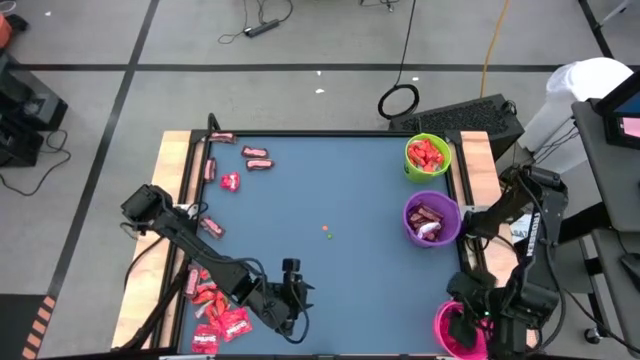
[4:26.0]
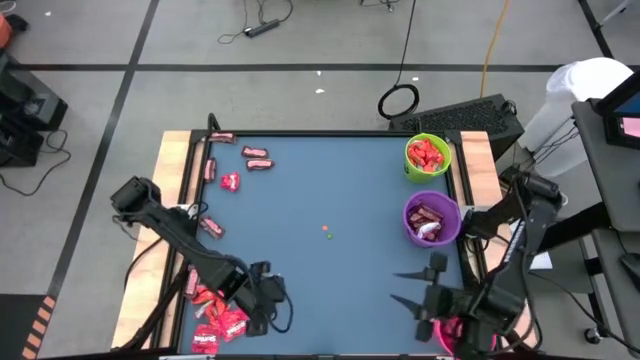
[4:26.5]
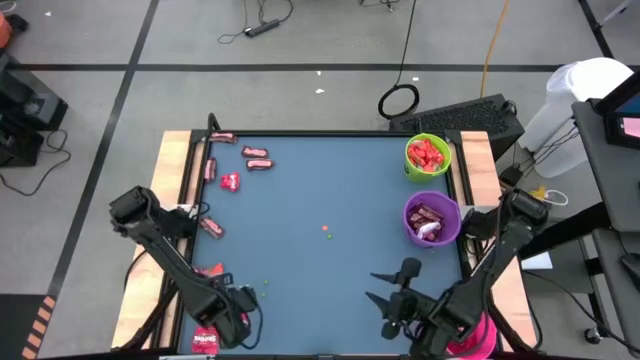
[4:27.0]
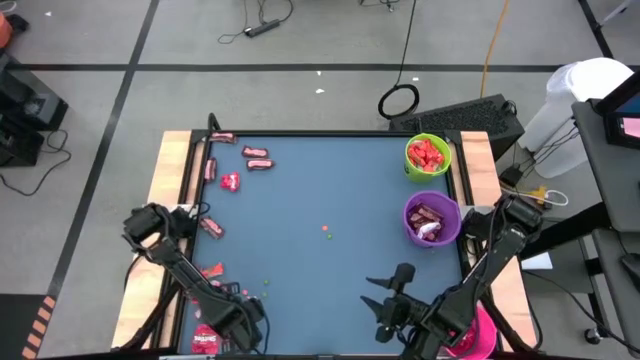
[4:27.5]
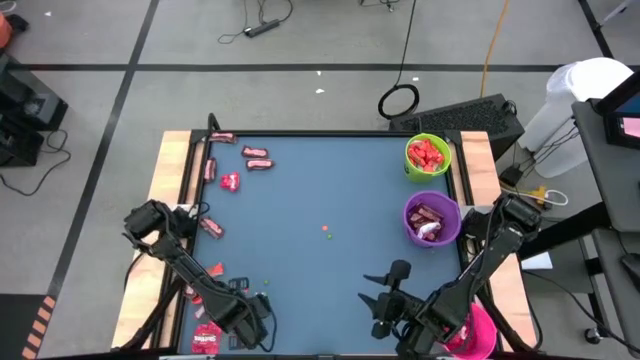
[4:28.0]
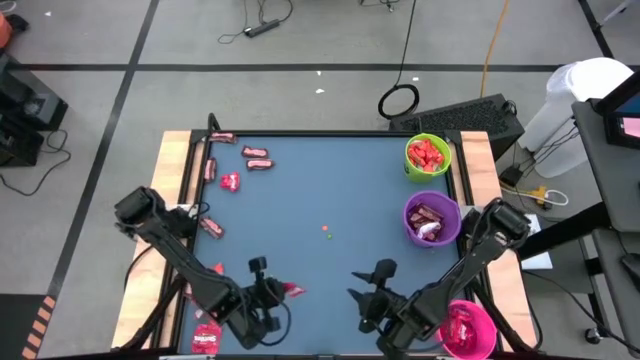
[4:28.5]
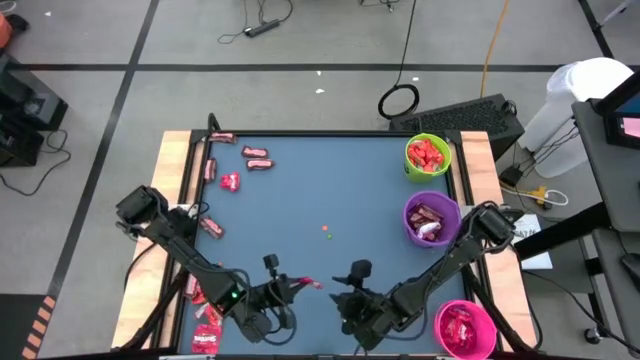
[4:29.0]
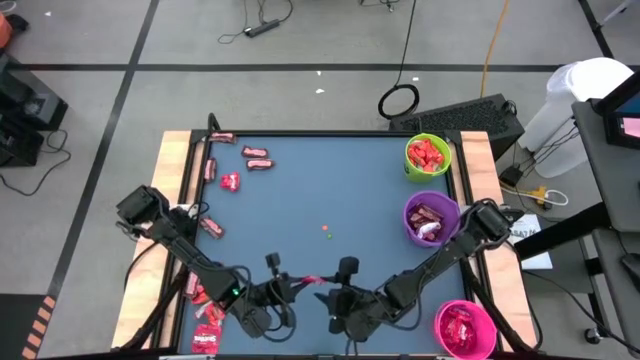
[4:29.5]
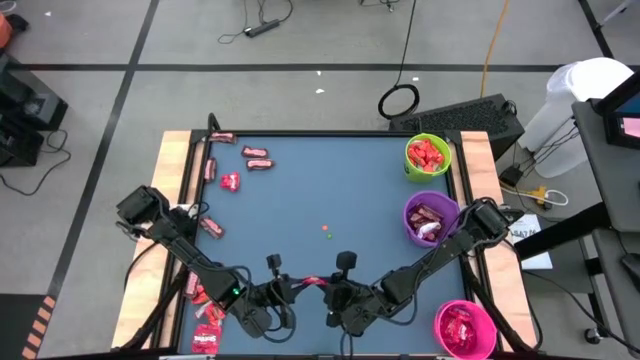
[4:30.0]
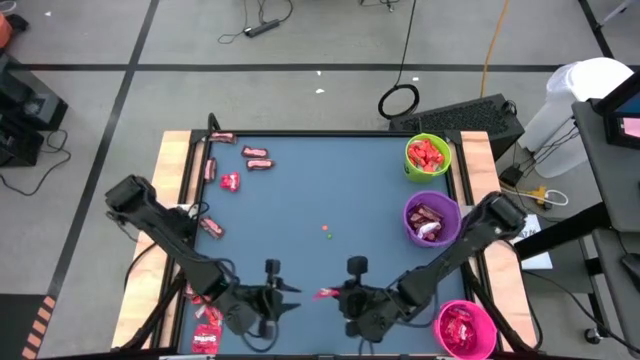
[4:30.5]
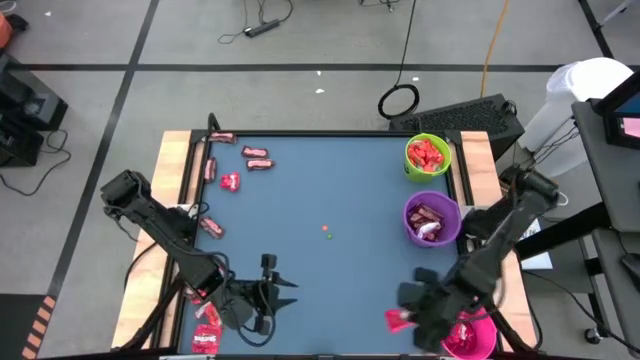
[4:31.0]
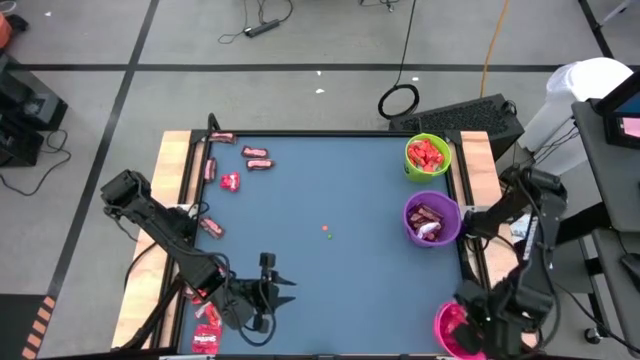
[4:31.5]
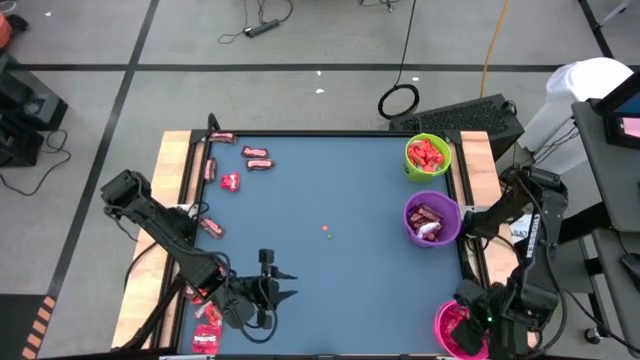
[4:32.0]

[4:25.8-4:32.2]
Task: Organize candy in baskets
Put the red candy pack into the pink bucket

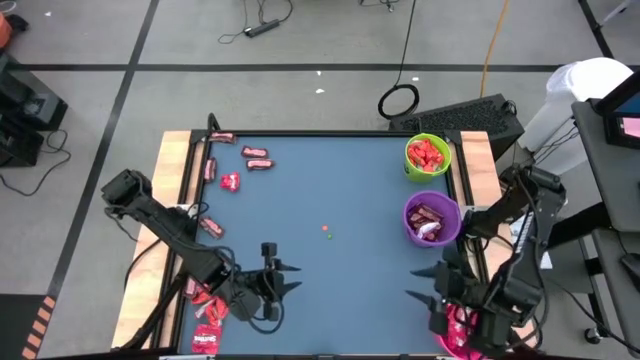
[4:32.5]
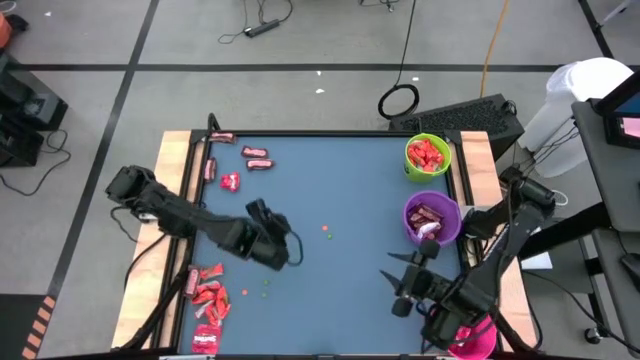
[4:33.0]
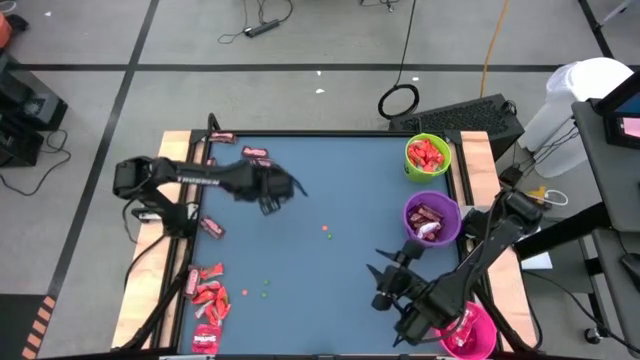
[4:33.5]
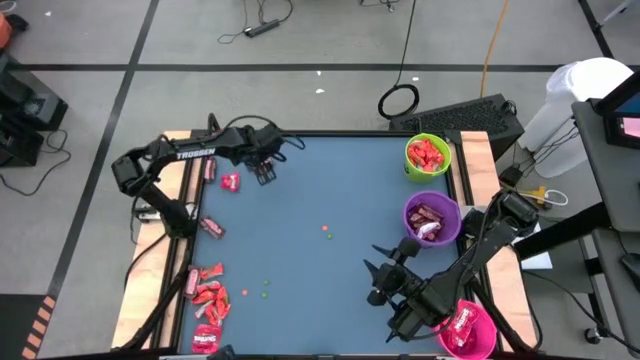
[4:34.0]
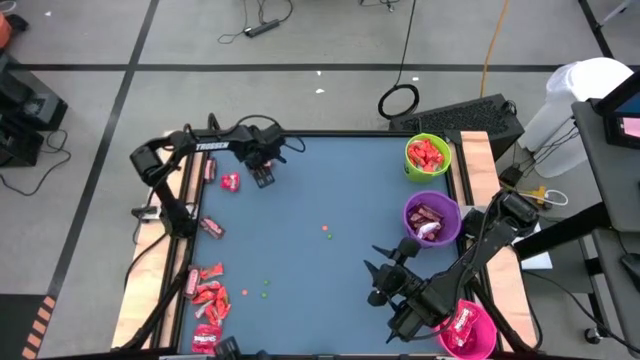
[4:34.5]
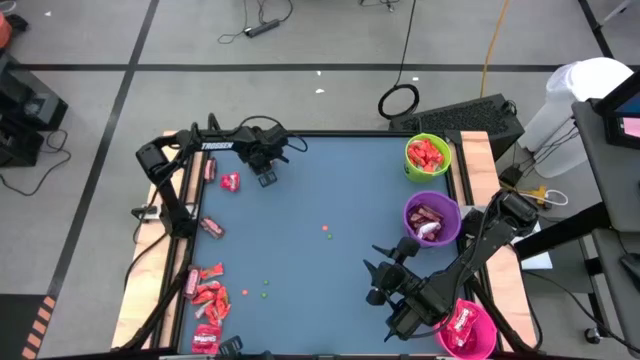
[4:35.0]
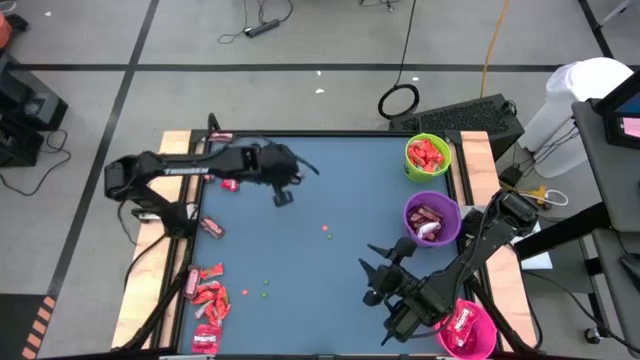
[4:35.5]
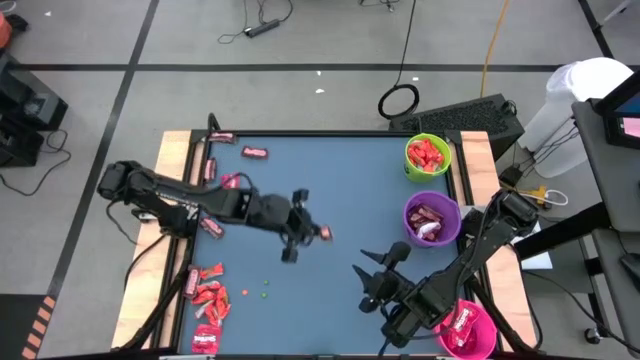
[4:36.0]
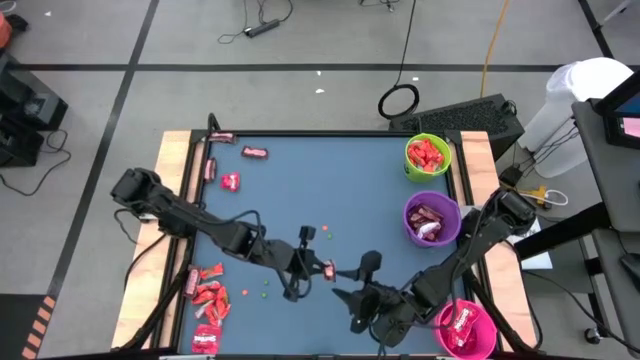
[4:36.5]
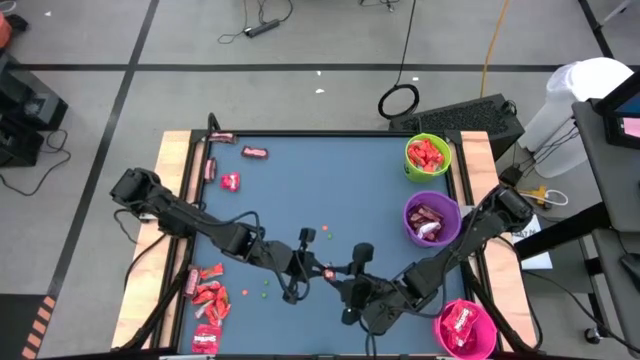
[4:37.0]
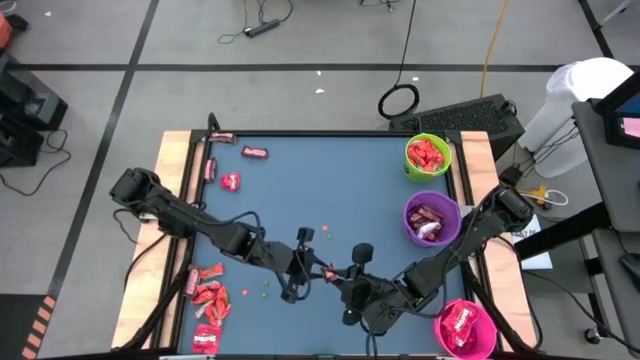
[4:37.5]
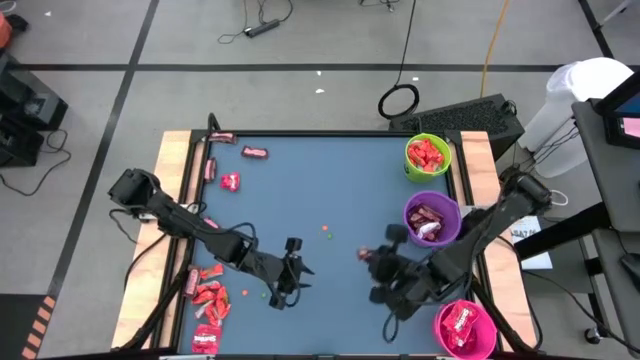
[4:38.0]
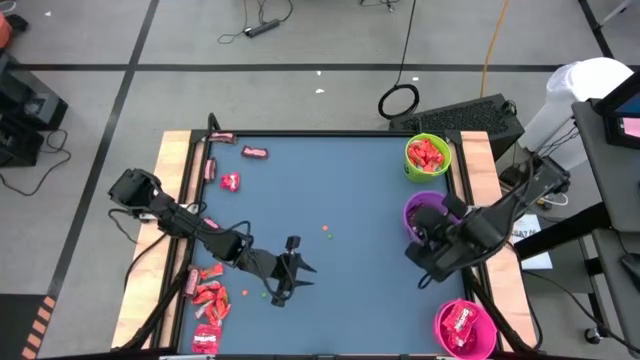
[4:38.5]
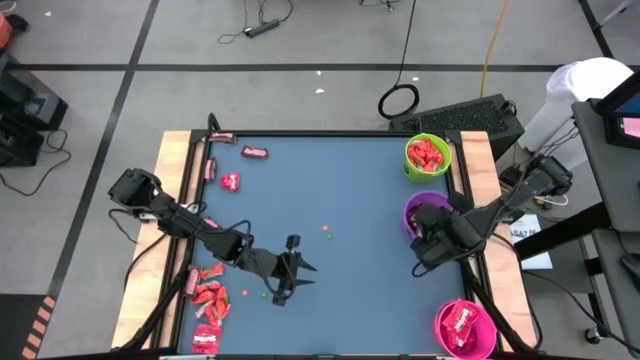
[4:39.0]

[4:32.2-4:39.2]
Put the brown chocolate bar into the violet bucket

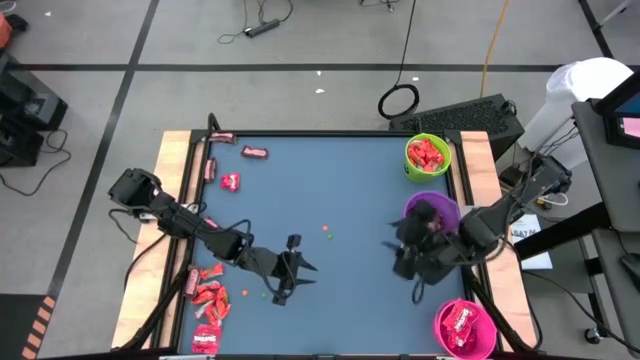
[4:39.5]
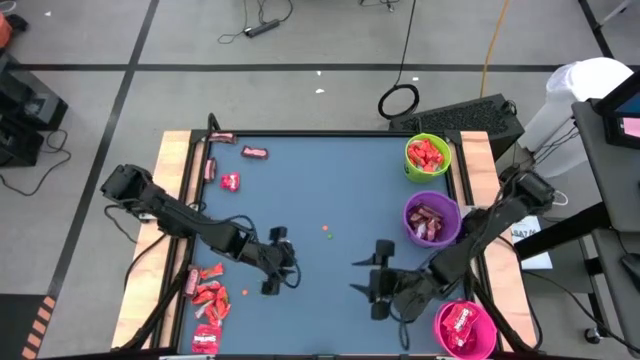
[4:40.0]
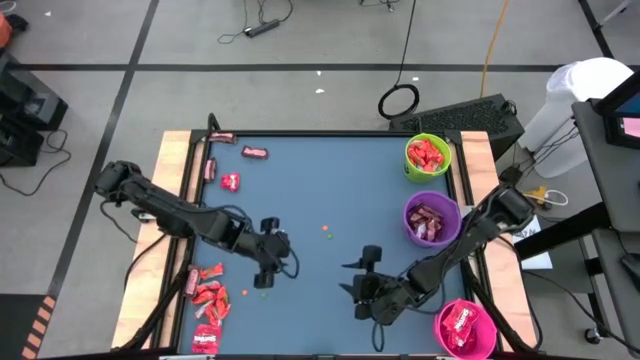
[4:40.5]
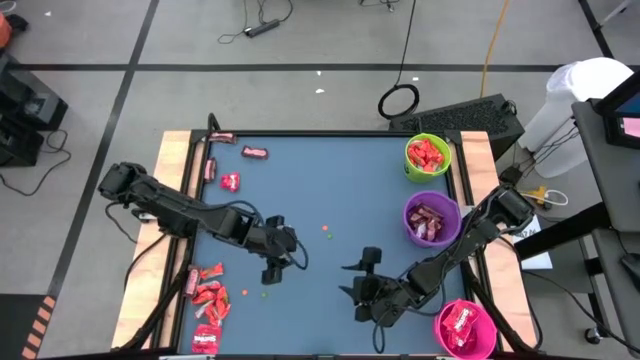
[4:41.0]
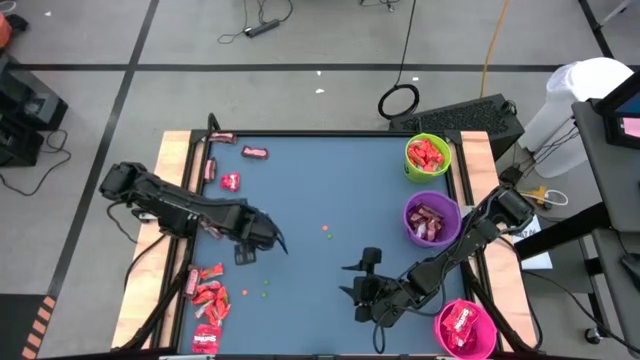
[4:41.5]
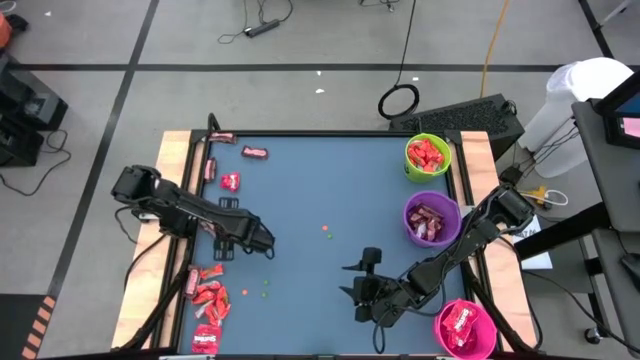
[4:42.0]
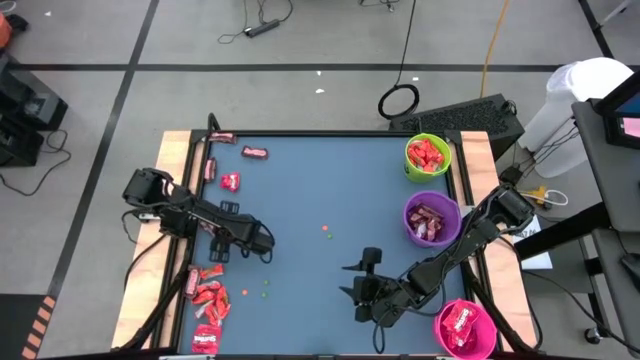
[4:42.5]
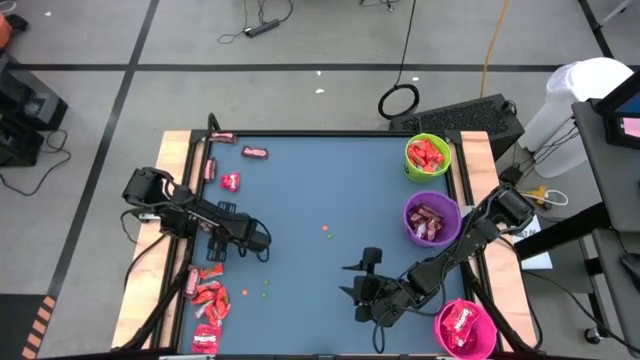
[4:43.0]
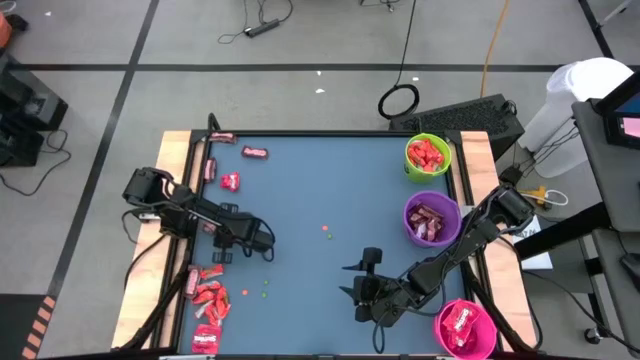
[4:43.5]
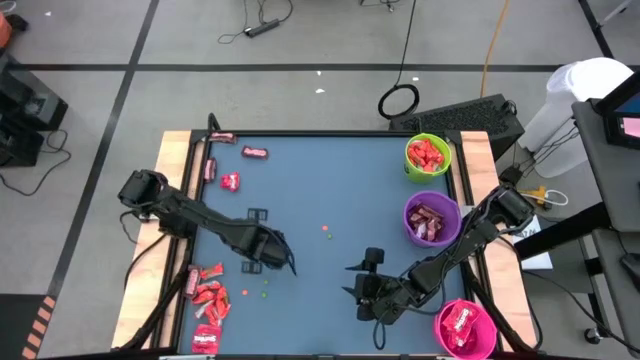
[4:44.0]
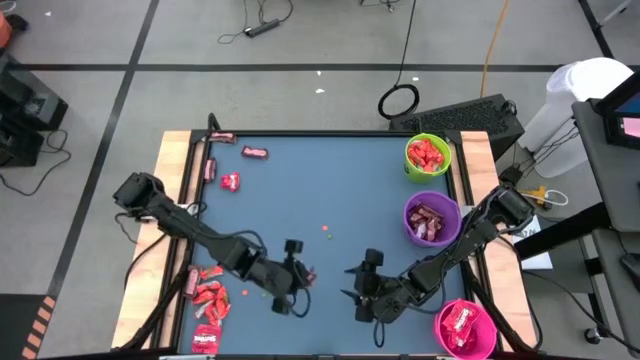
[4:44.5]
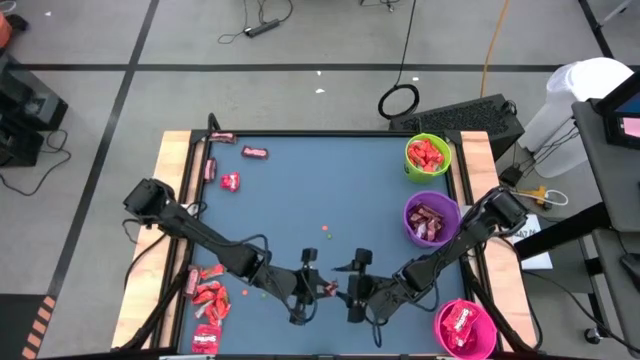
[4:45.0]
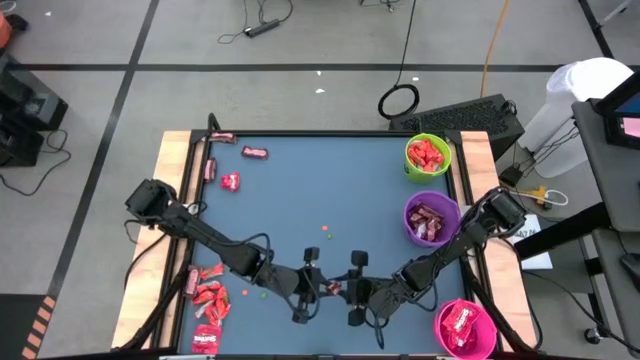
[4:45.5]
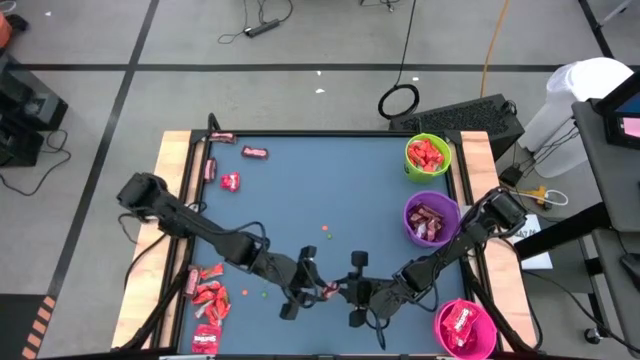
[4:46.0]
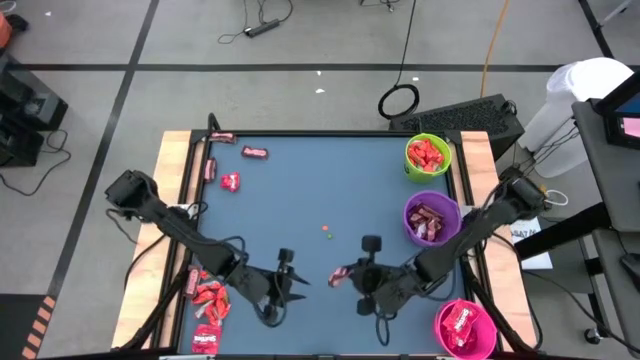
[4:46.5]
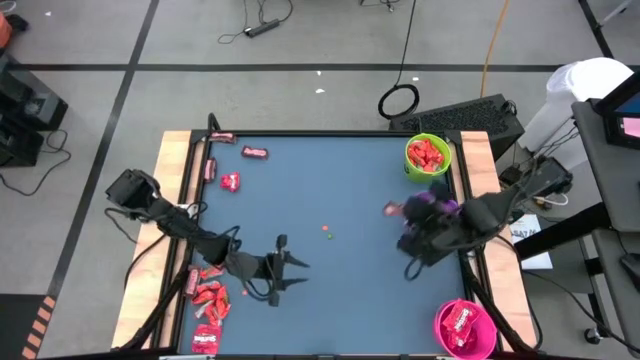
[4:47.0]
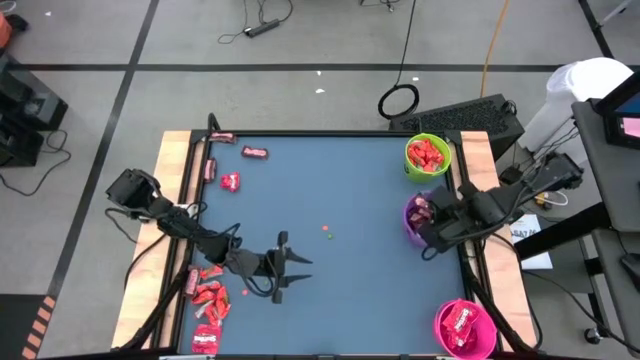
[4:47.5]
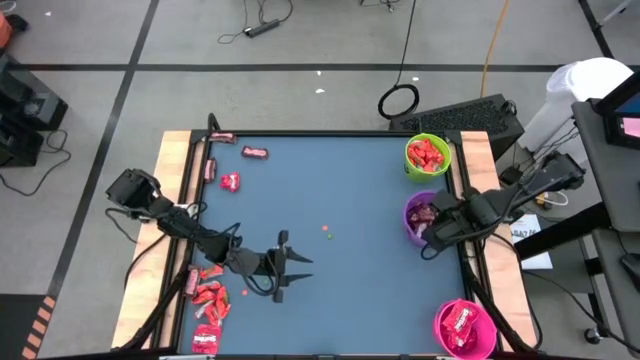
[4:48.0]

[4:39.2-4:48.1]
Put the brown chocolate bar into the violet bucket
